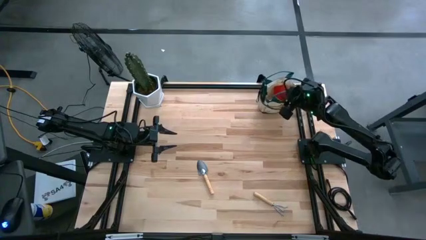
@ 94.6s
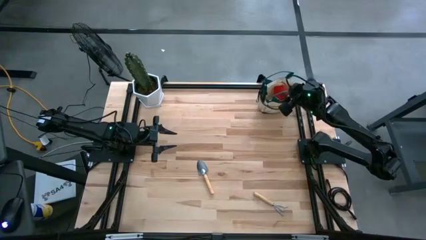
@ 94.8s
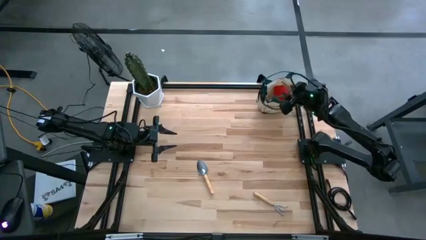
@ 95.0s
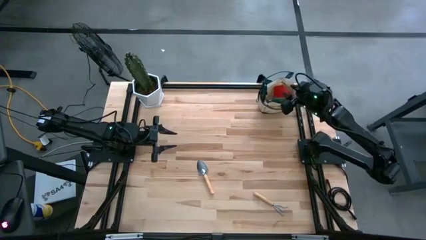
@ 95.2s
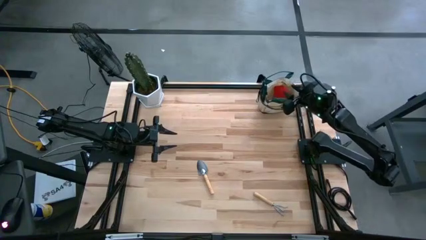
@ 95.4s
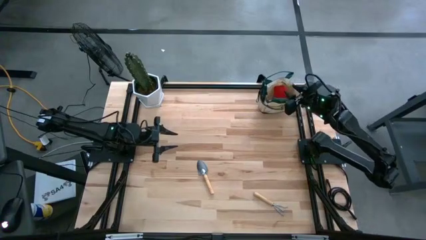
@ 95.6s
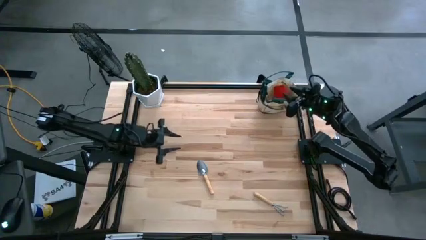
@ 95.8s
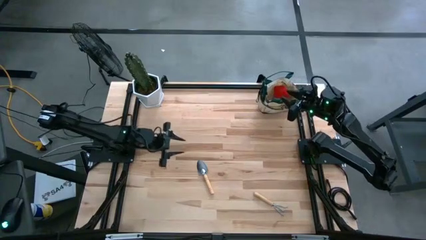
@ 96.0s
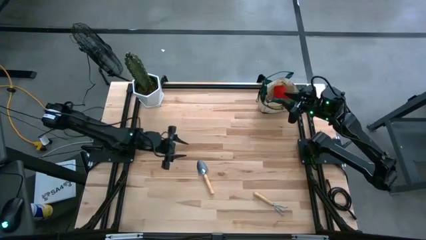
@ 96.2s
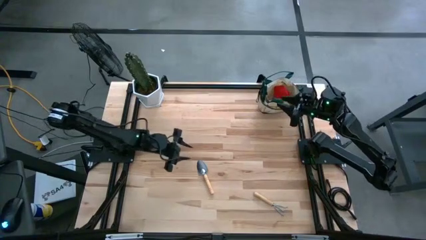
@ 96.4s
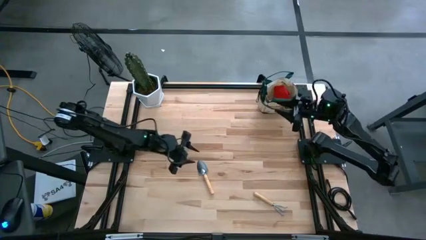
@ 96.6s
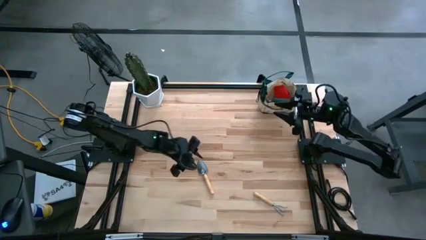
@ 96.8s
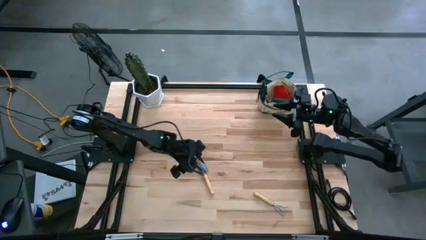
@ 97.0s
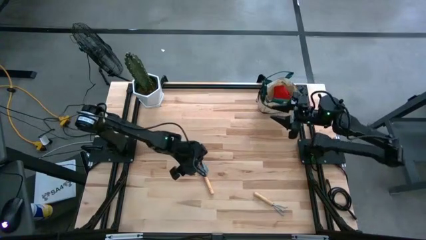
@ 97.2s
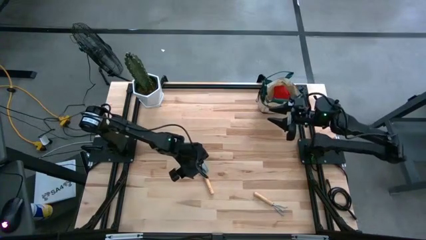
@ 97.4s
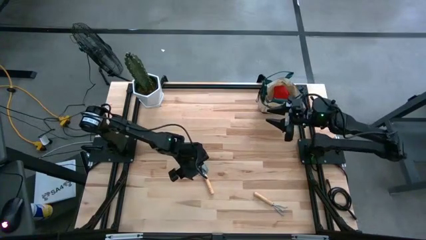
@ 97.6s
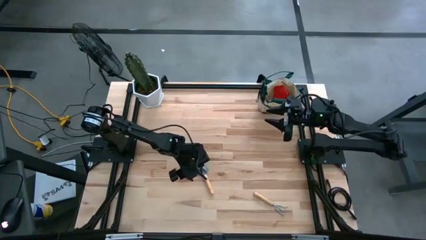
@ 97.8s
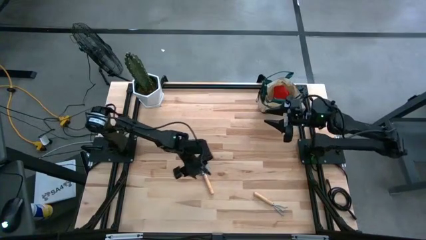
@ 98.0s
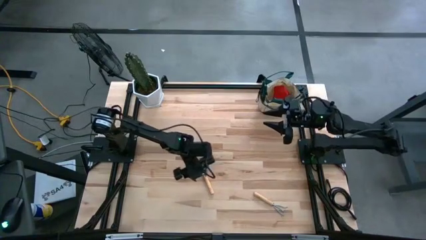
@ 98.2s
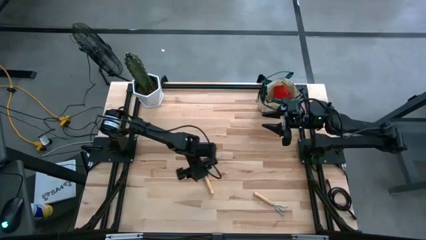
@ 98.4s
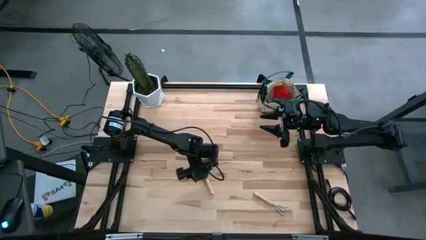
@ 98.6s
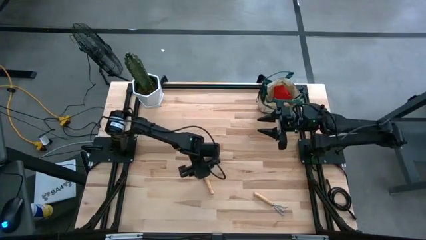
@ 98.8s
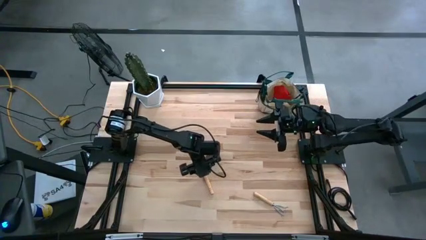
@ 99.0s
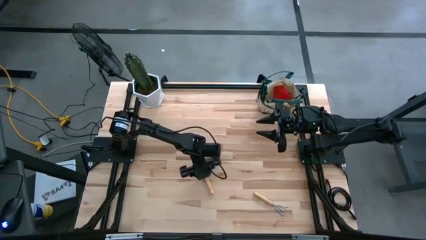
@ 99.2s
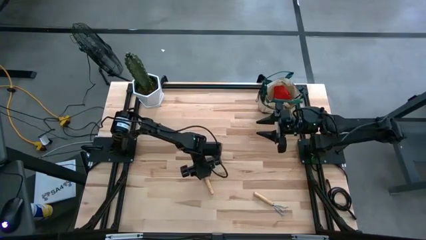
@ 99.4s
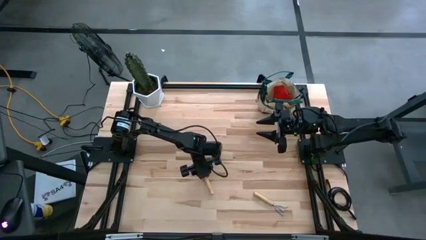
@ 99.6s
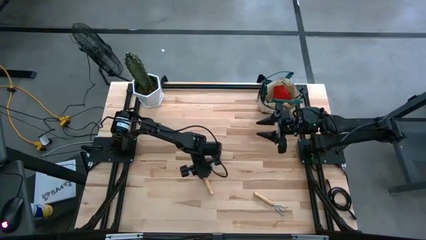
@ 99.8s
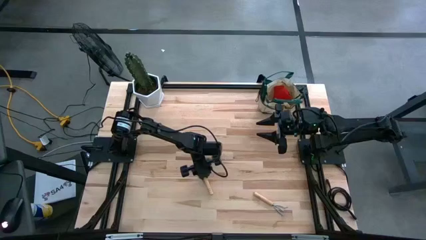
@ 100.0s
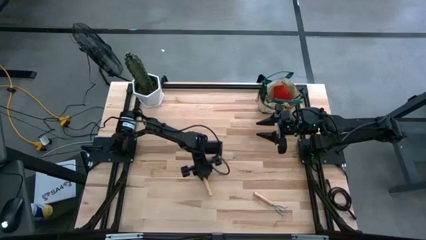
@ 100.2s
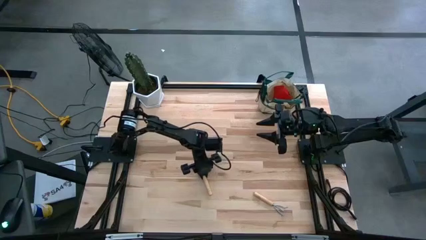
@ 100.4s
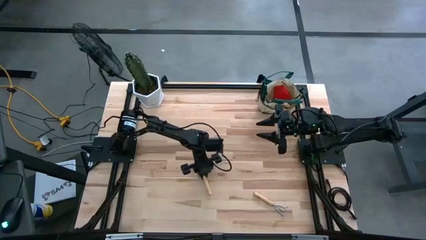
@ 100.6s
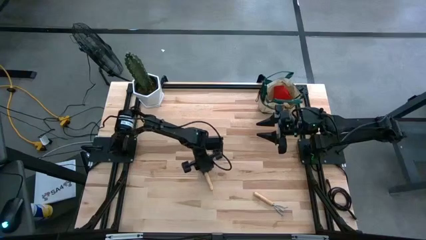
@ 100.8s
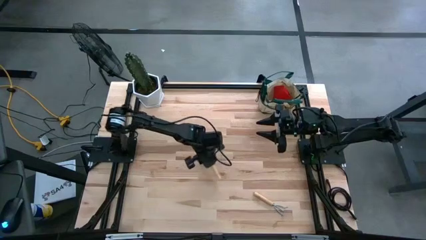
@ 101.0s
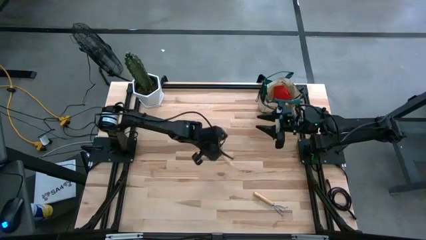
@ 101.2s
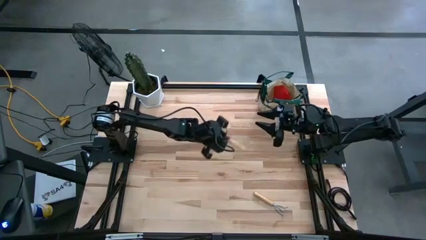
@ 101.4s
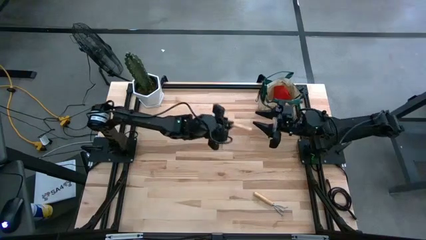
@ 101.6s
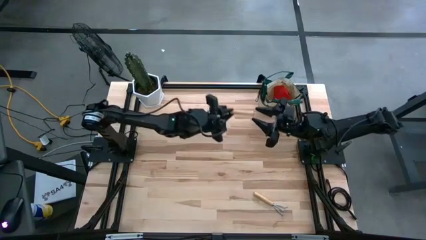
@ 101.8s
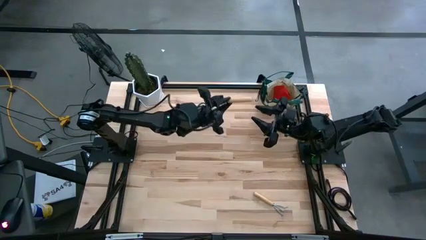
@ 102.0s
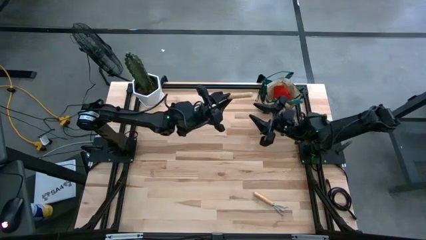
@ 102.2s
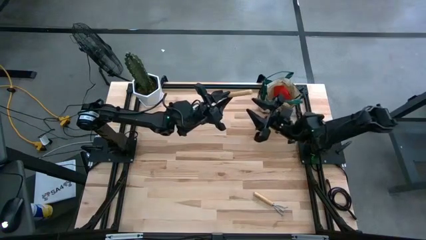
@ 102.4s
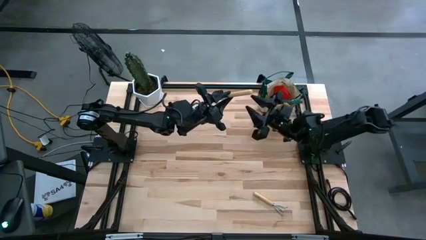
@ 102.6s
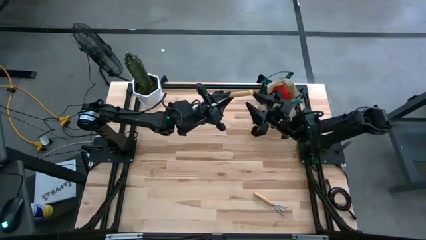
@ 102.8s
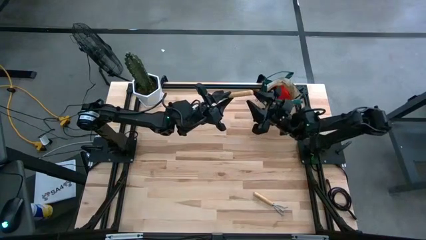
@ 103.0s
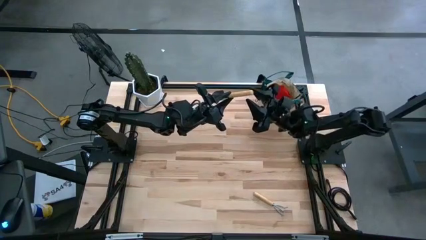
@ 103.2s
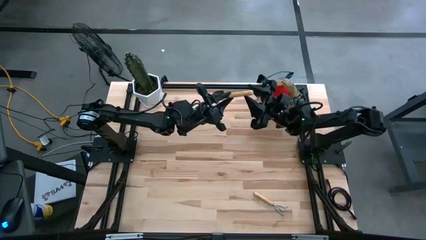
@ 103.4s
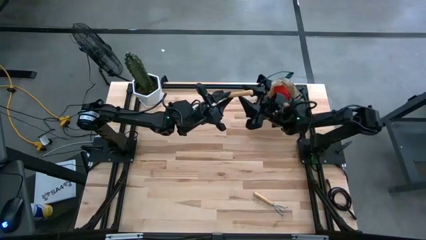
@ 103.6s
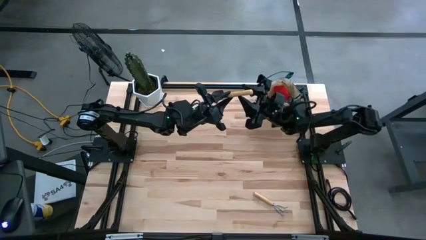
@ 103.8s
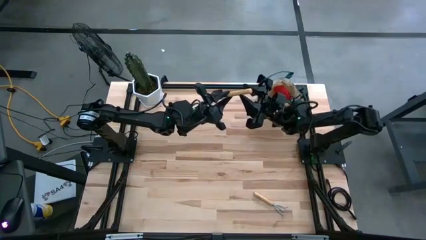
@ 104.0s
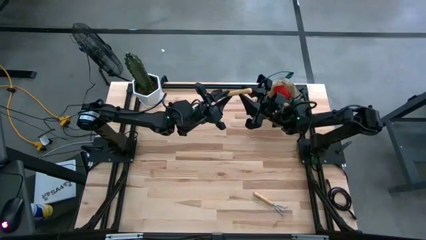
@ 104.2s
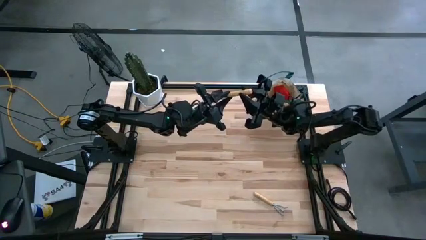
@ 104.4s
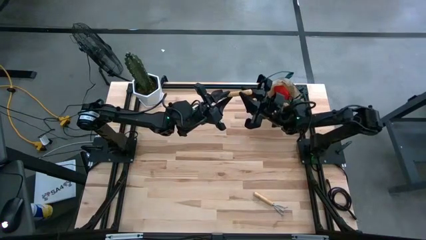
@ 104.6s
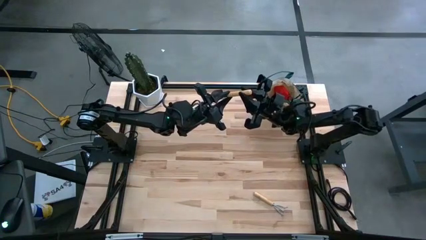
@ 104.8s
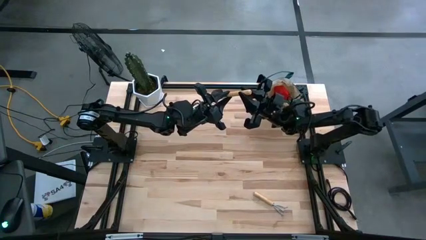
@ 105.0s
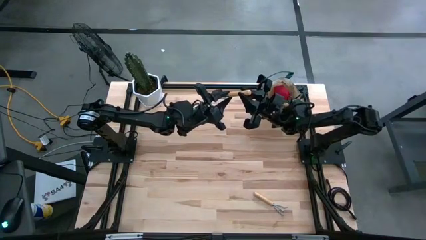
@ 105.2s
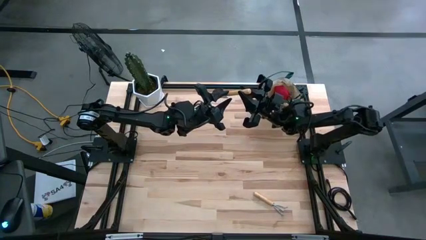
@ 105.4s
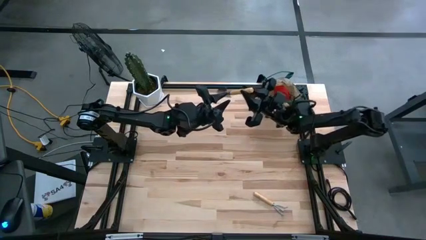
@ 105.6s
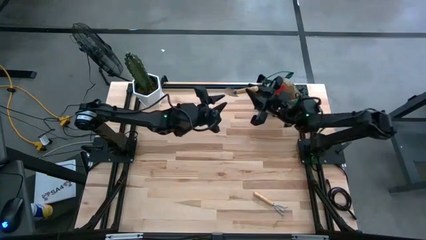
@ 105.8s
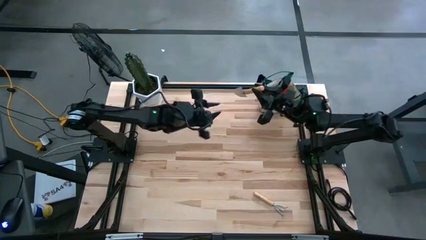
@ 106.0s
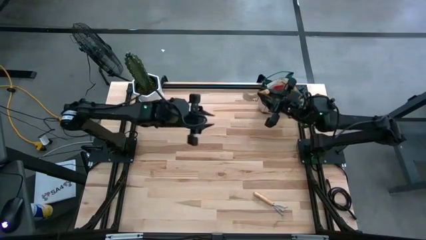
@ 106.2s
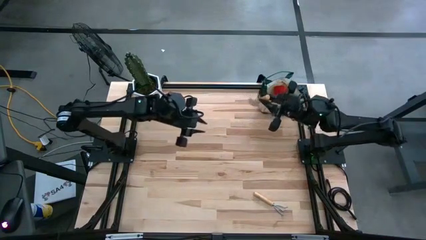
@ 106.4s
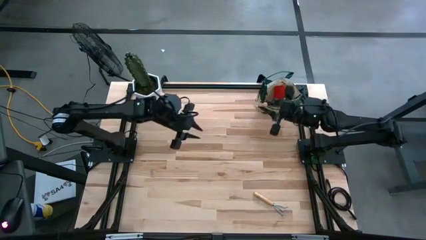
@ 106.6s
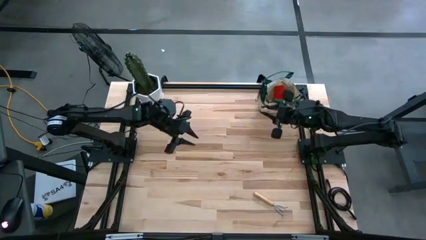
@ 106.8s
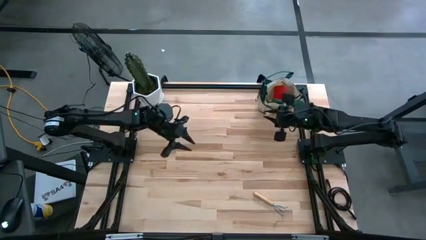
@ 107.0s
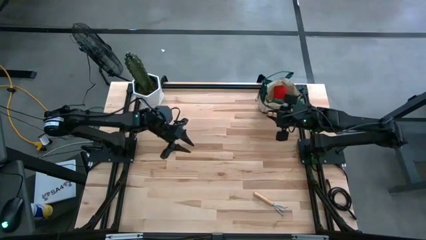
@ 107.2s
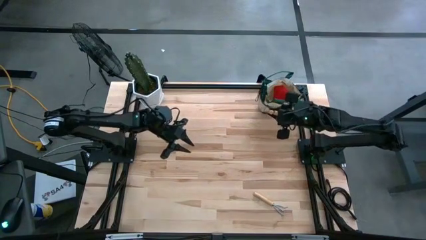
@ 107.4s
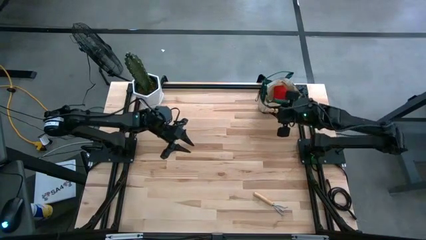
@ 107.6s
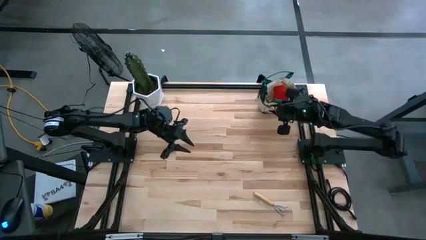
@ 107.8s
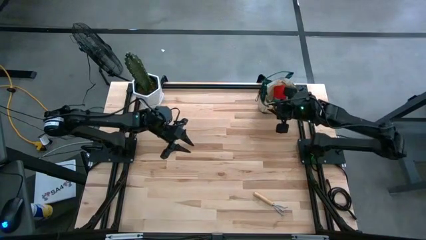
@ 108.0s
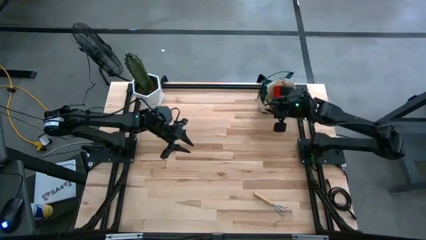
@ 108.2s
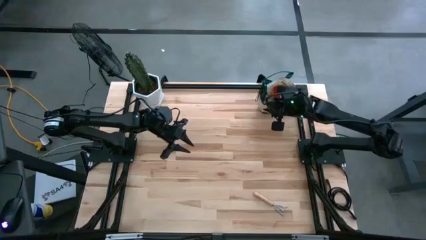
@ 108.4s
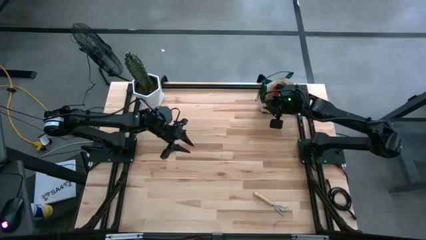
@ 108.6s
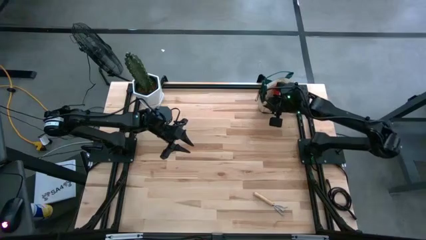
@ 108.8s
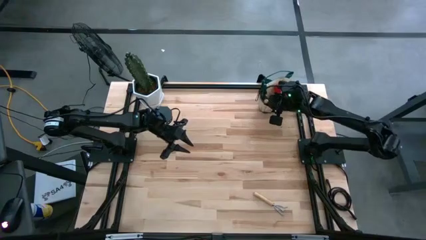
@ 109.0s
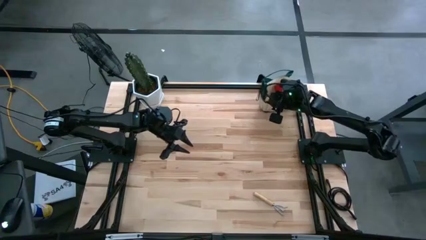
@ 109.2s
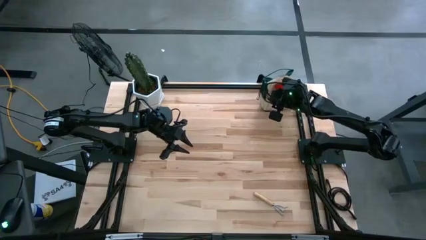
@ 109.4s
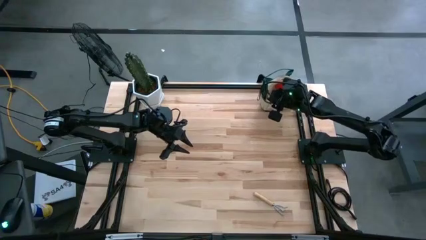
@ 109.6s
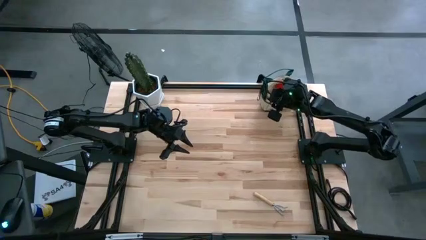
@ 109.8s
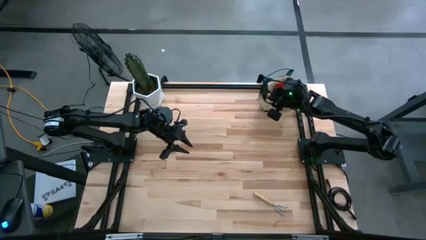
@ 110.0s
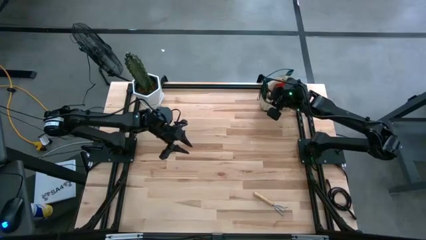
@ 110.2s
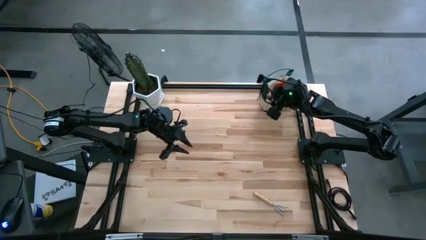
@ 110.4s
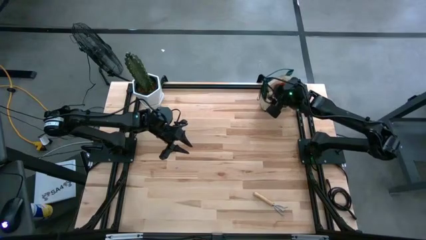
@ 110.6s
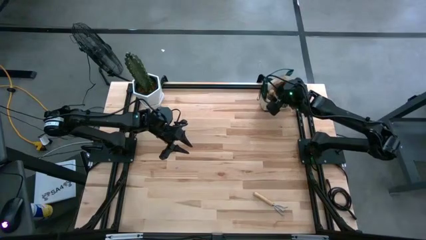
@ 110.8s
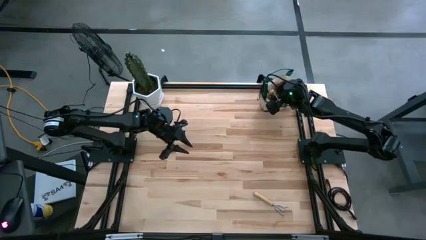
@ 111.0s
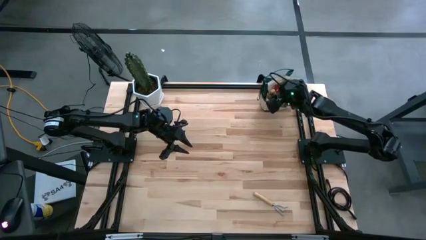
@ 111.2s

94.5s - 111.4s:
Task: Pick & Place Garden tools in Gardening bag
Put the brown trowel into the gardening bag

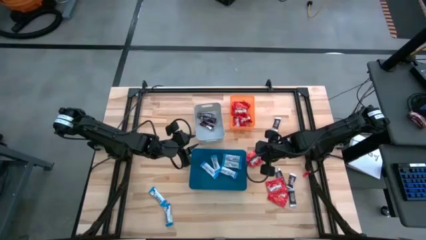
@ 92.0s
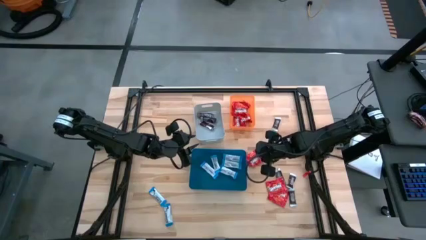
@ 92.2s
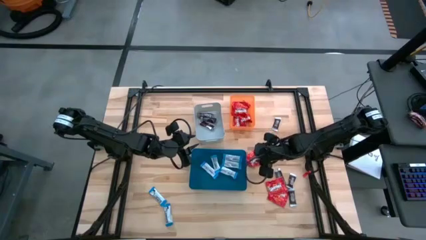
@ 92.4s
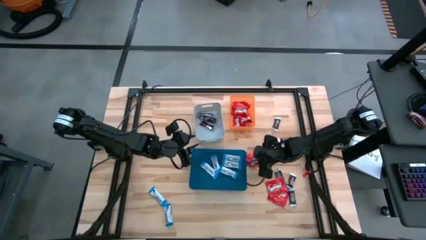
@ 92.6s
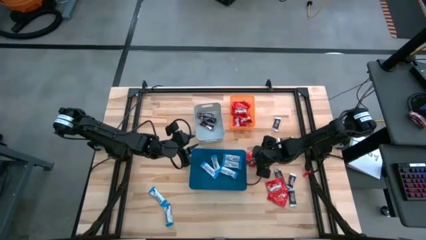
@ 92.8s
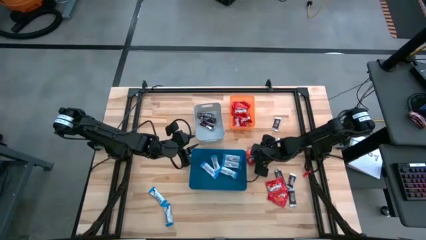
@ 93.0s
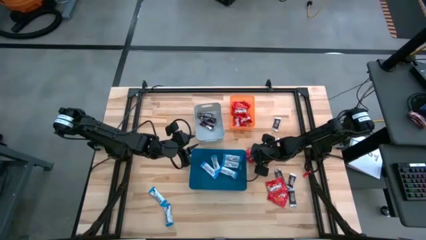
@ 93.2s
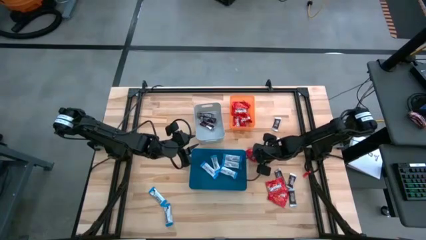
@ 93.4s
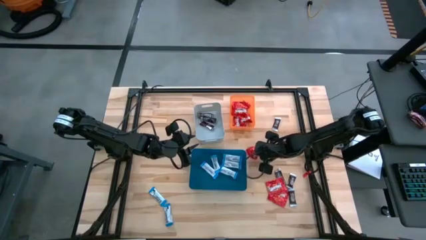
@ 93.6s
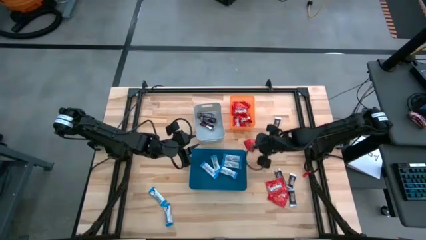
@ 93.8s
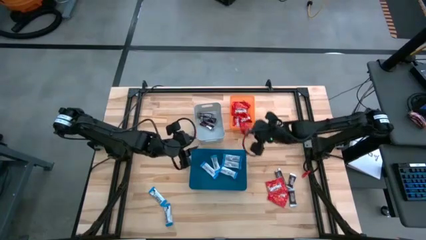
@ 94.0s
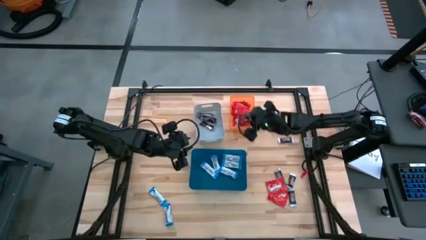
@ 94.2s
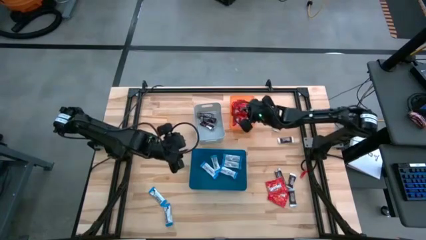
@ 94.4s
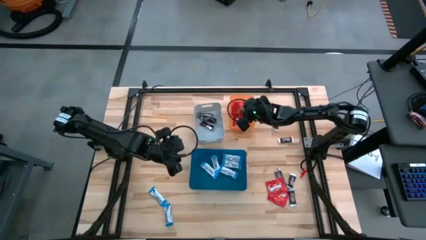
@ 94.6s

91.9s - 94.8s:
Task: Sort candy
Put the red chocolate into the orange bin
